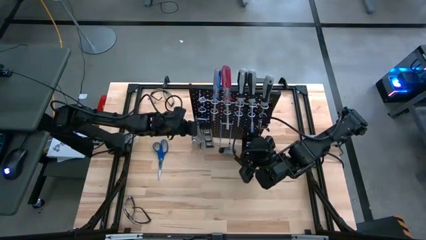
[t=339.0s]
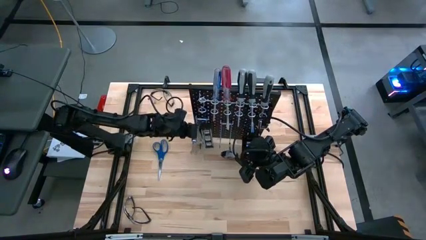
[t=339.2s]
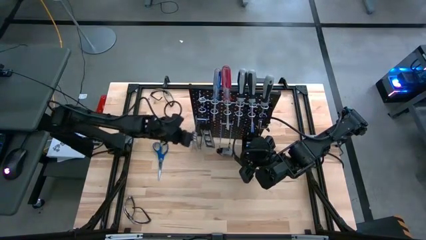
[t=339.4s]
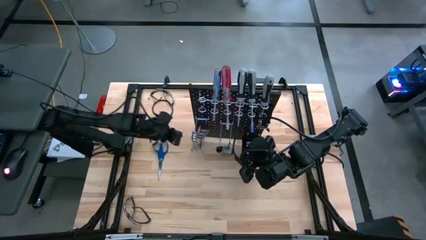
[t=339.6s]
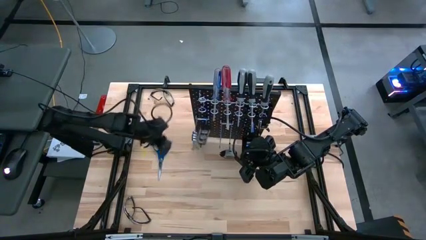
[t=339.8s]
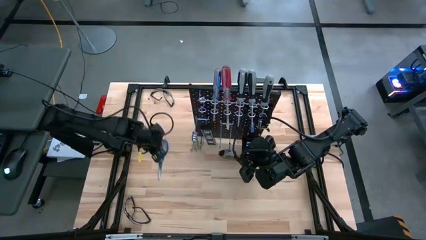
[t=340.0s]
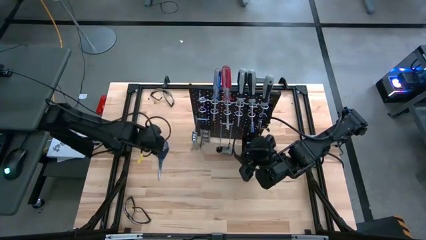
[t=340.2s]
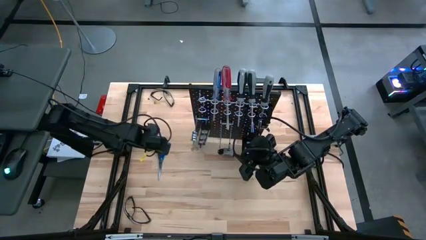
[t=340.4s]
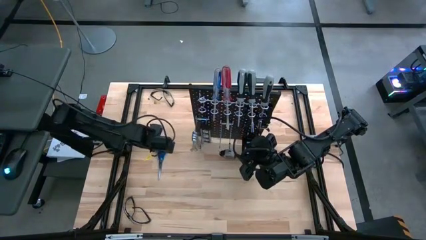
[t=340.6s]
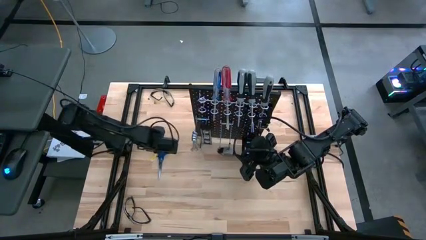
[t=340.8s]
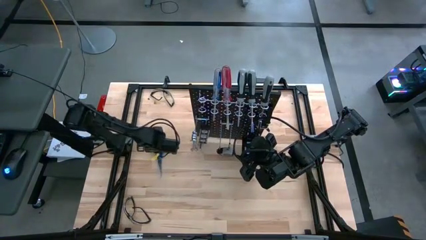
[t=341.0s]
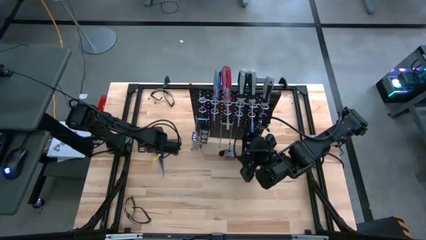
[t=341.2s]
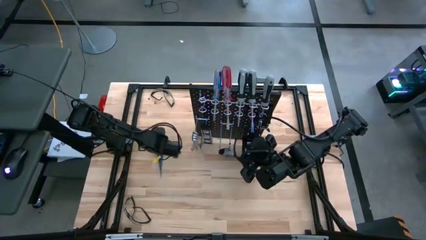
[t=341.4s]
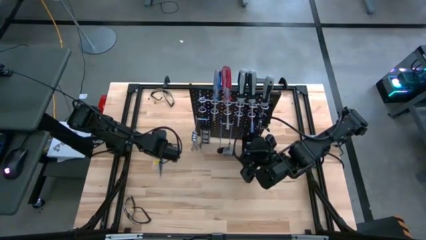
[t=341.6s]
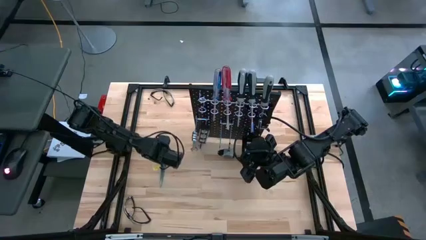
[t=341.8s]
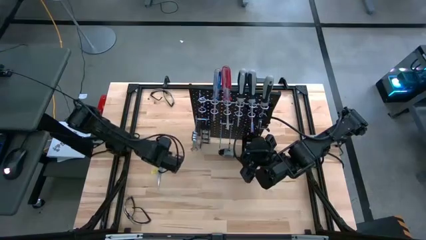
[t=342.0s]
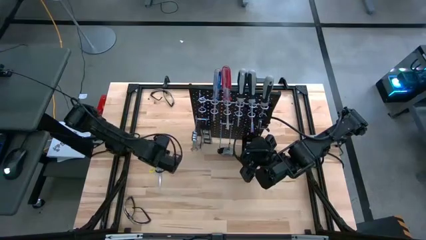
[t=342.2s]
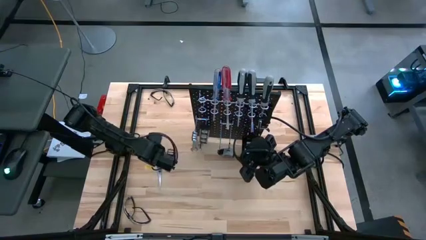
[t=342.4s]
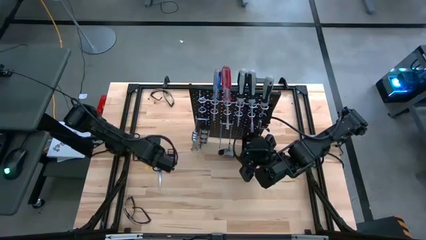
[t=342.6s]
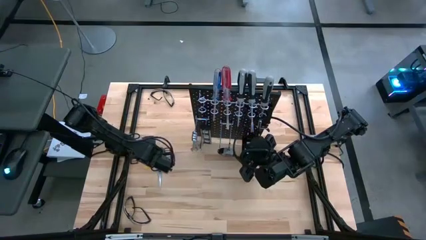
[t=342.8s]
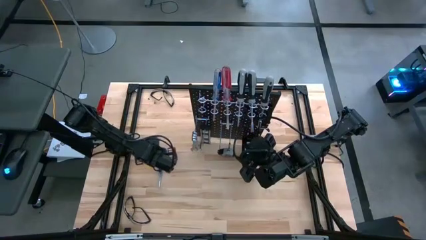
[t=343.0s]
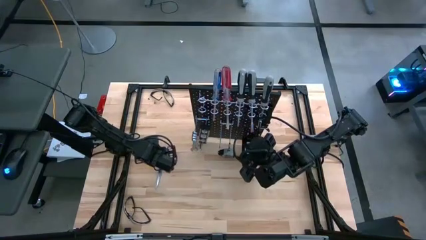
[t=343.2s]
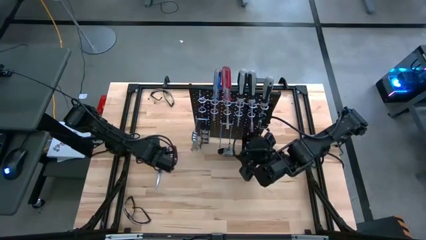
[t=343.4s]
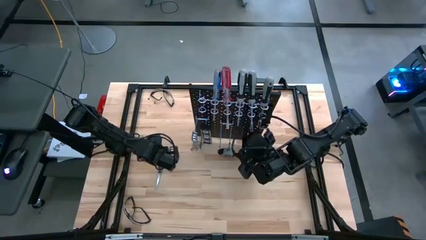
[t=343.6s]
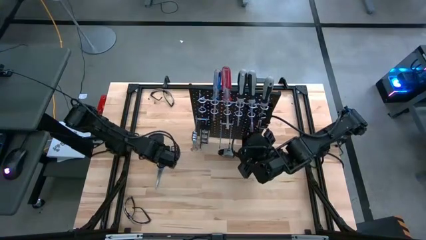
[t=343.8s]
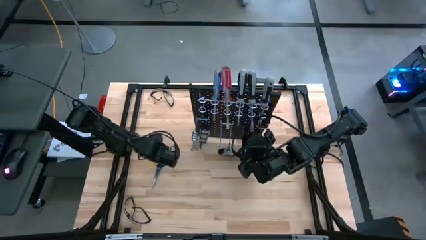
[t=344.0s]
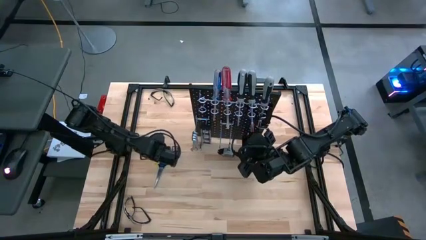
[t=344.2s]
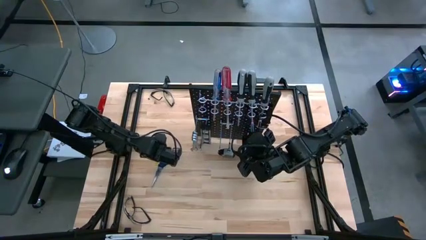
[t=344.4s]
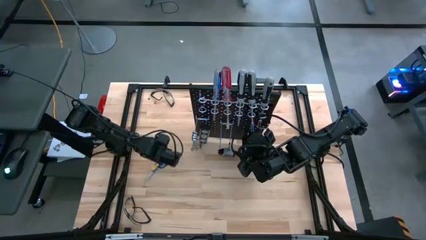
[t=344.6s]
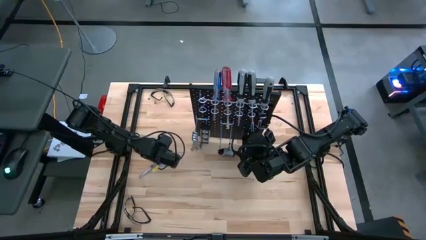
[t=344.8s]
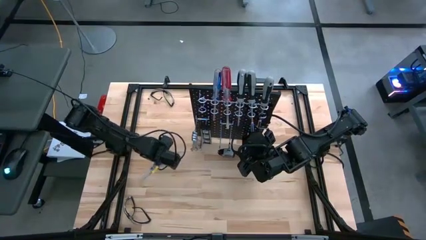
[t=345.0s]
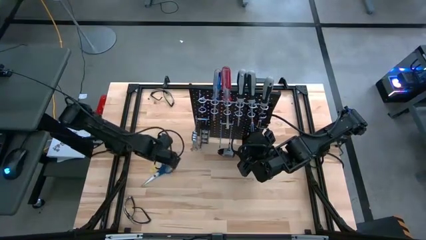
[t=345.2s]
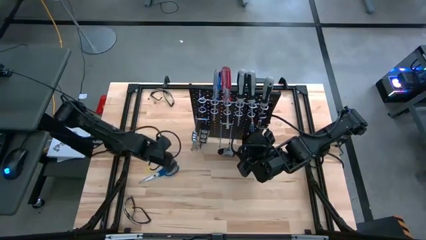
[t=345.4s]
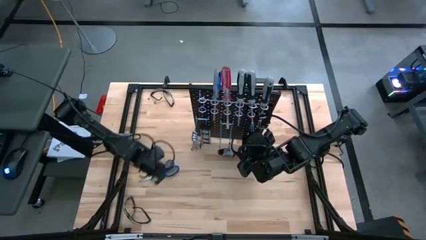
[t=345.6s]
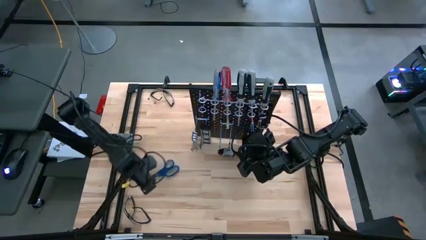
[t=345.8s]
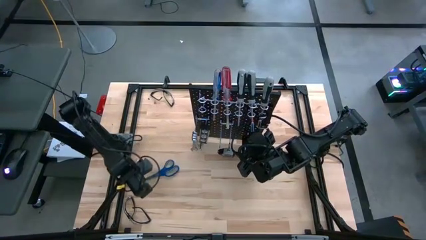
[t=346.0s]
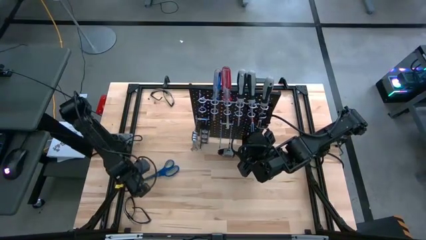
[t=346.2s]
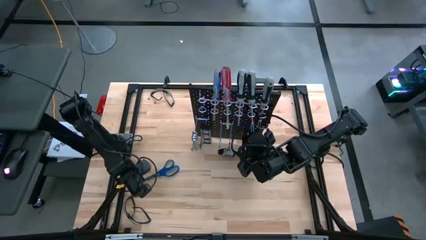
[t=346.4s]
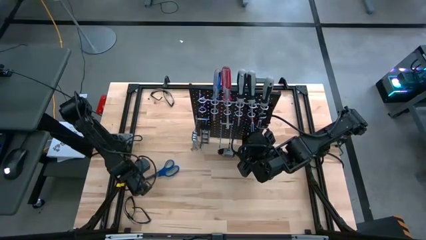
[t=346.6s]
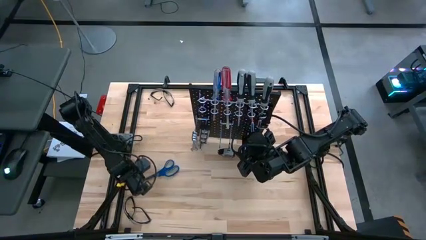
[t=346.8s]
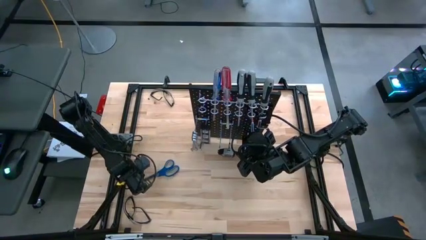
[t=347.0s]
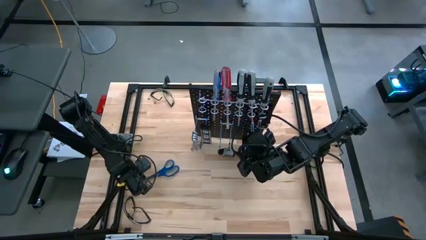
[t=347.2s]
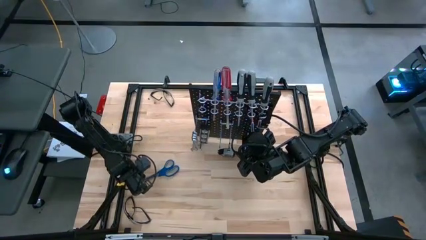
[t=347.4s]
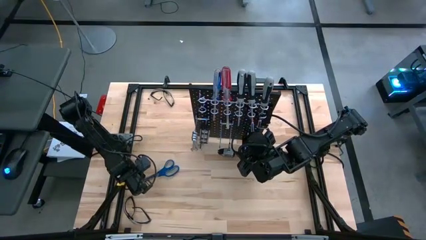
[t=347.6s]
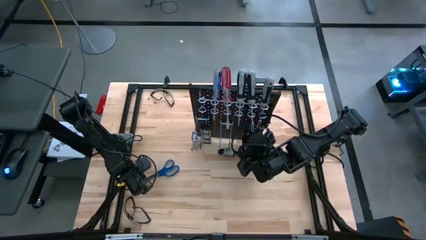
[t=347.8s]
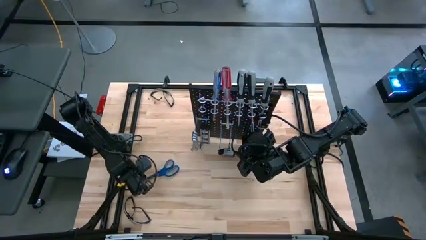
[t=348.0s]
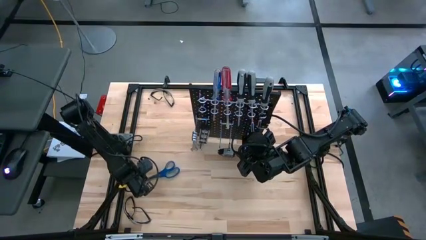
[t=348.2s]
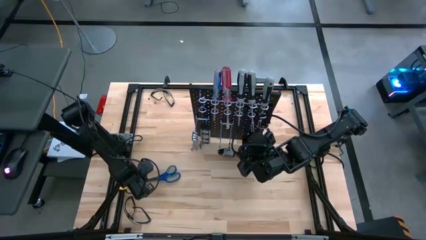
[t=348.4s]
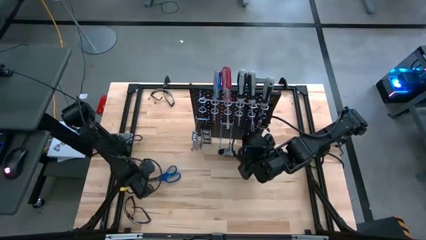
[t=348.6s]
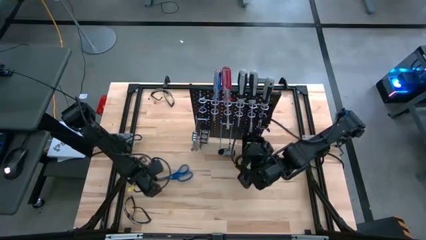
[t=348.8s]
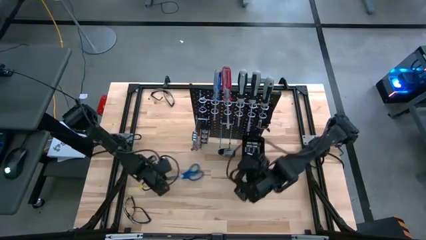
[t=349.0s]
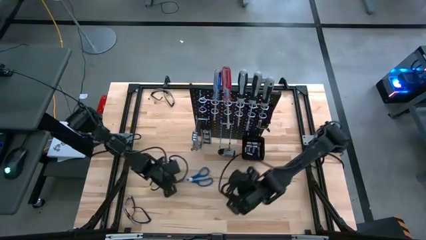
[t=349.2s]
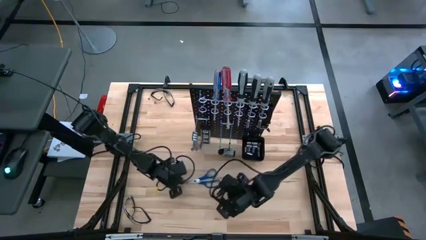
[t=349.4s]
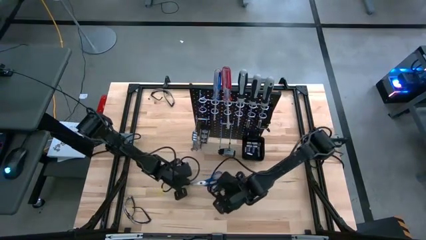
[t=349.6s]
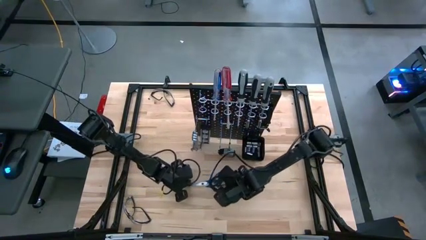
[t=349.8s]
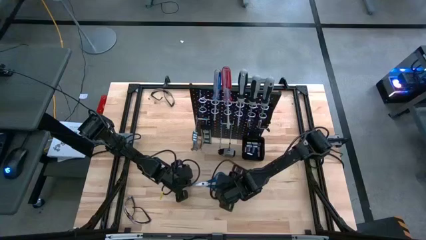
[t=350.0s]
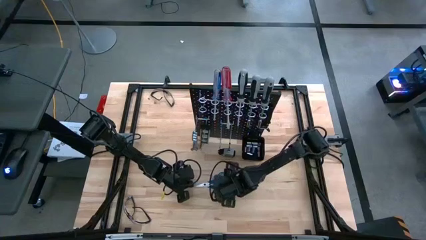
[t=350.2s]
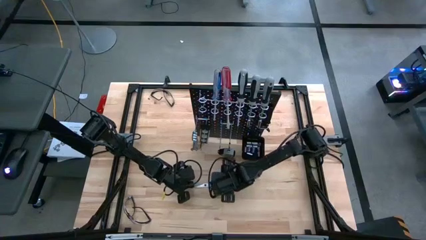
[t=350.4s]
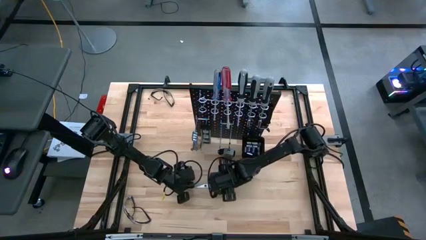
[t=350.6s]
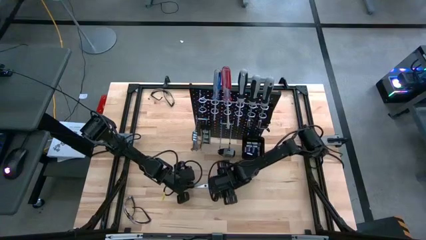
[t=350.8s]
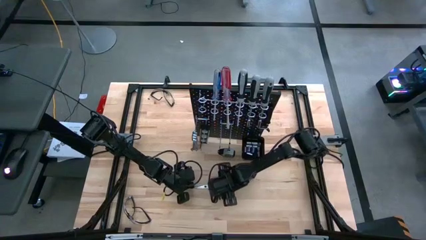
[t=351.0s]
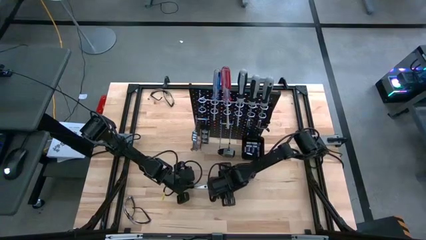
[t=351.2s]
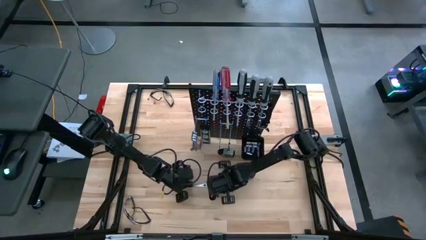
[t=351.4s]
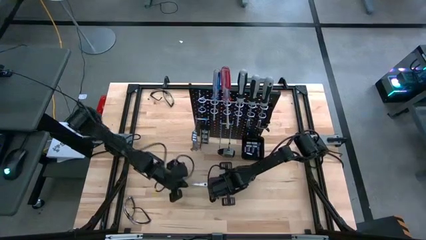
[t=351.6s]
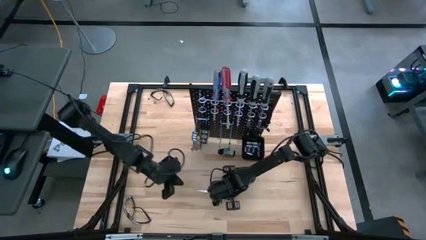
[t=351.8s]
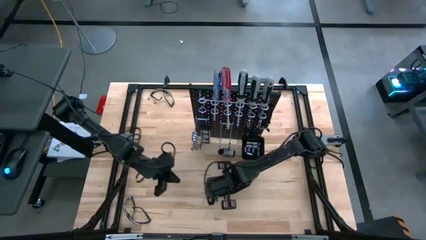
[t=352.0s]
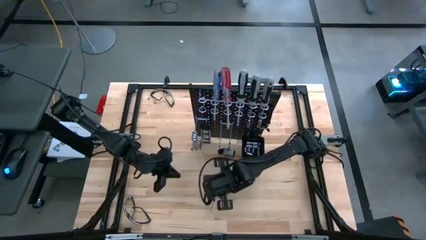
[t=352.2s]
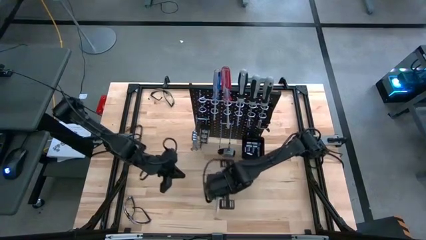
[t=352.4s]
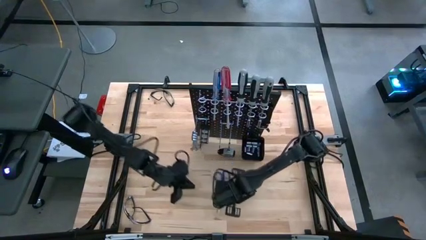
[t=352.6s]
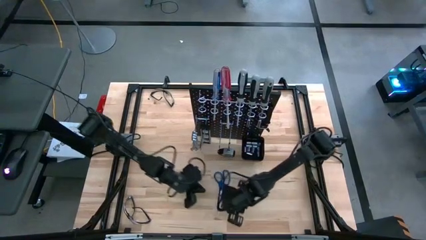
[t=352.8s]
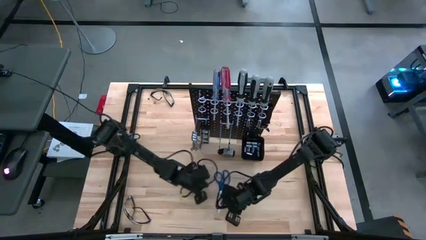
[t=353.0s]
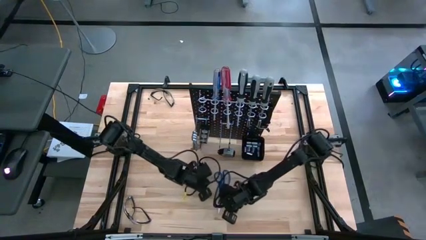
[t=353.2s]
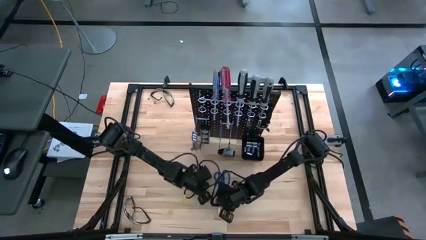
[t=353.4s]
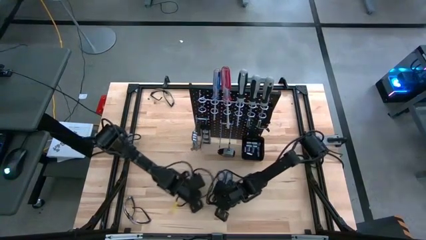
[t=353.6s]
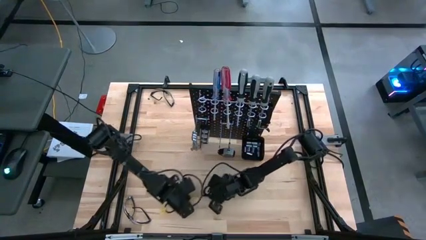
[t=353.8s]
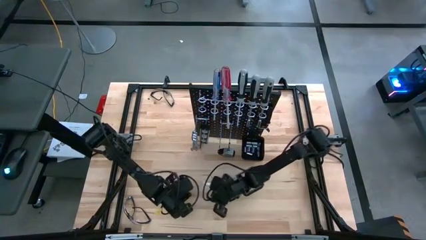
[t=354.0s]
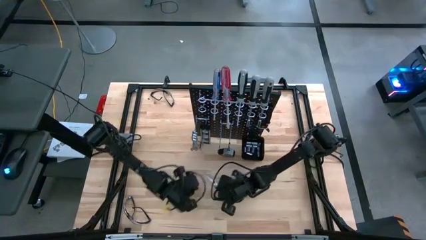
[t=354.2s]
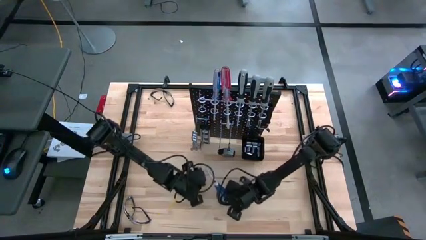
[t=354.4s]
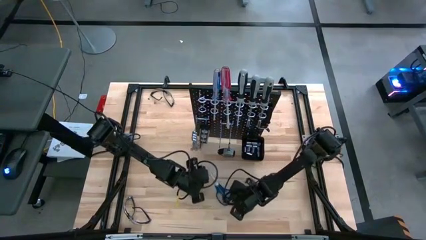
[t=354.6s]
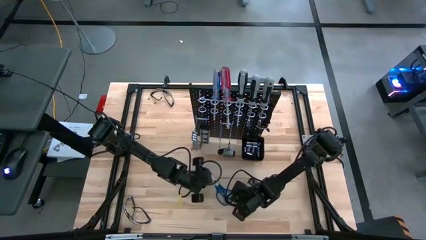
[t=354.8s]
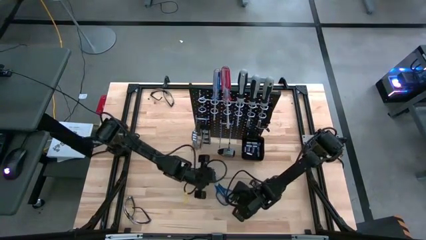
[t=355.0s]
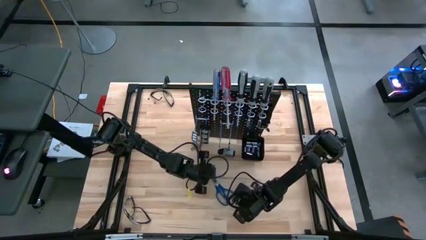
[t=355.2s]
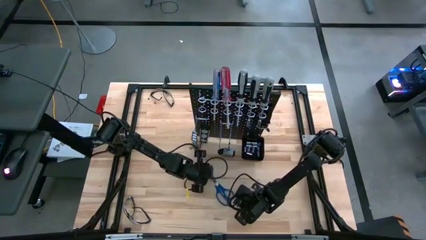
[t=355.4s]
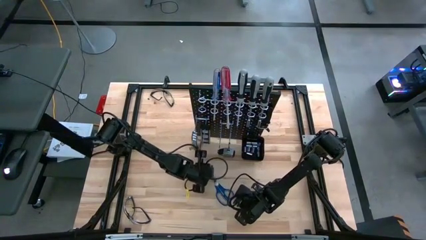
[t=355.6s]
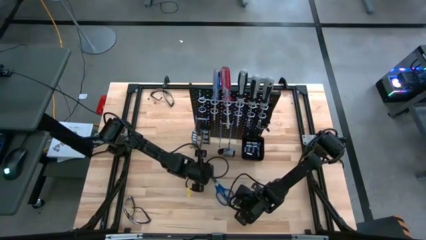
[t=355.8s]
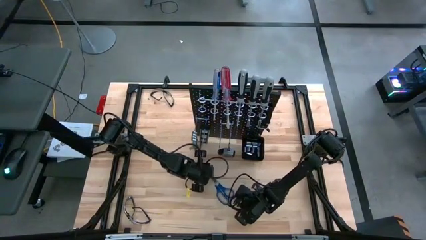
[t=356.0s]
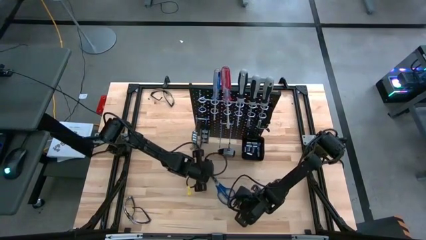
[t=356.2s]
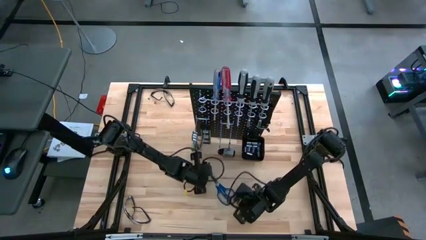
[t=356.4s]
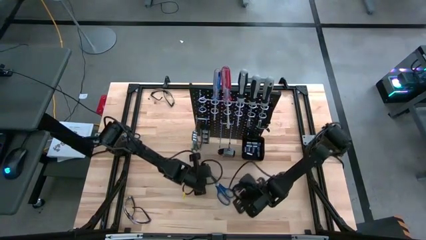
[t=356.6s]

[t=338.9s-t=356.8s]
Task: Hang tools onto peg board
Hang the blue scissors on the pegboard
